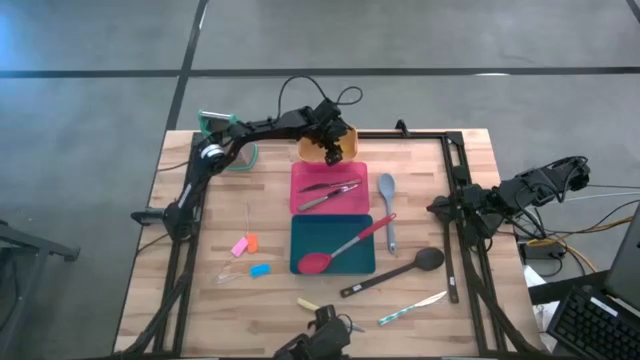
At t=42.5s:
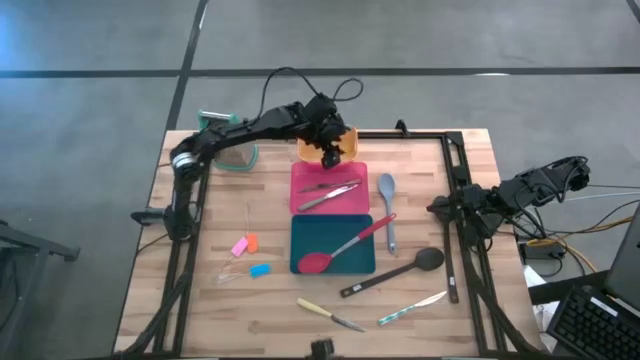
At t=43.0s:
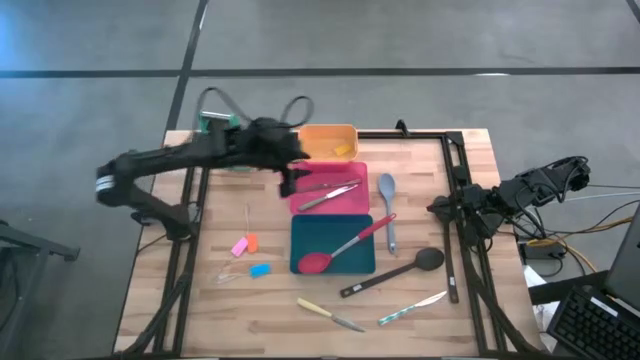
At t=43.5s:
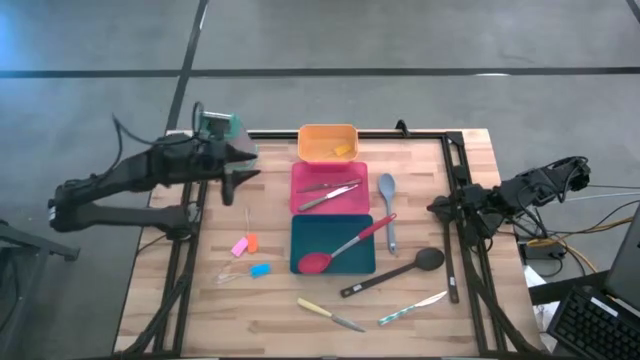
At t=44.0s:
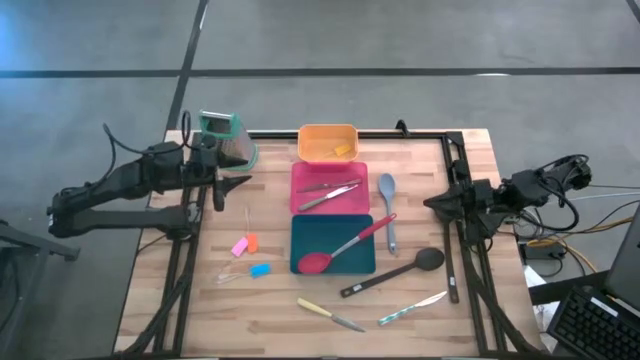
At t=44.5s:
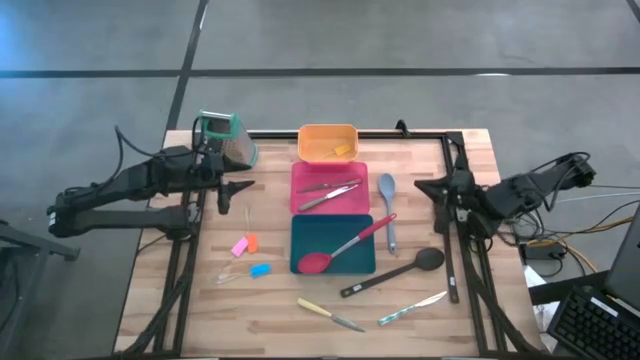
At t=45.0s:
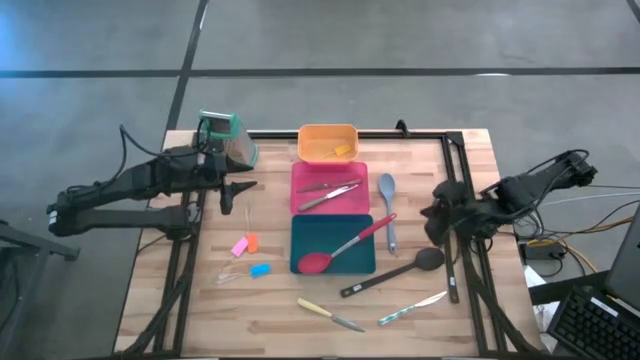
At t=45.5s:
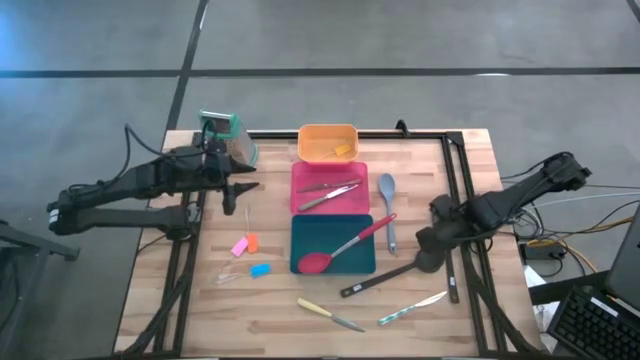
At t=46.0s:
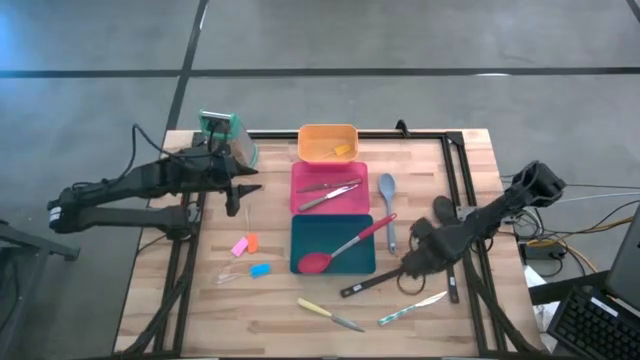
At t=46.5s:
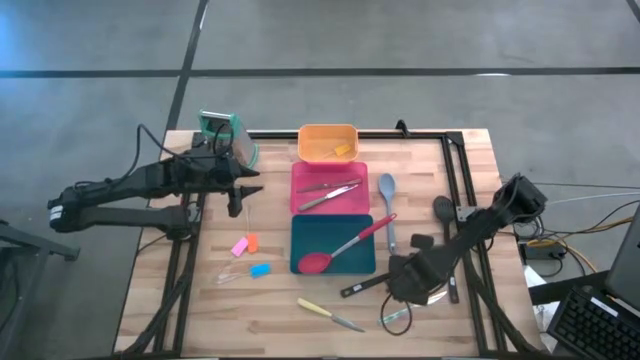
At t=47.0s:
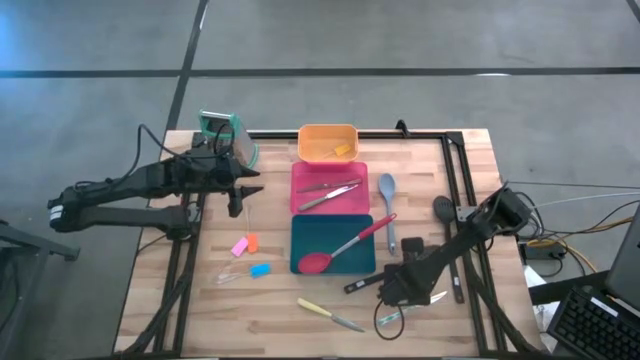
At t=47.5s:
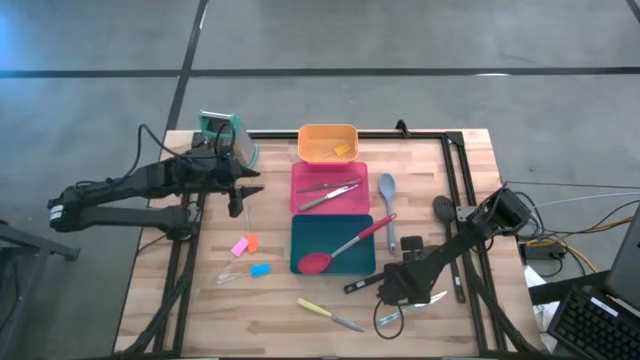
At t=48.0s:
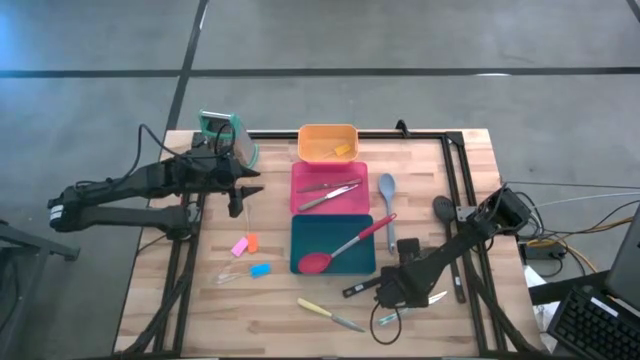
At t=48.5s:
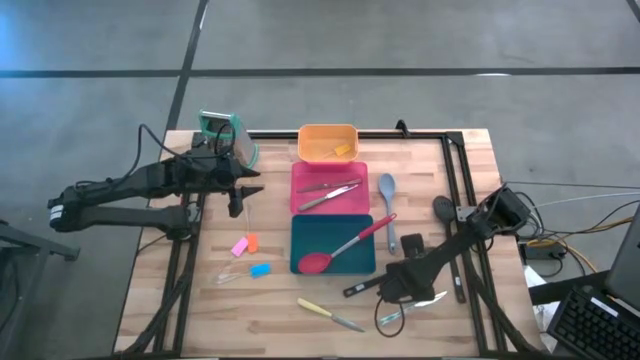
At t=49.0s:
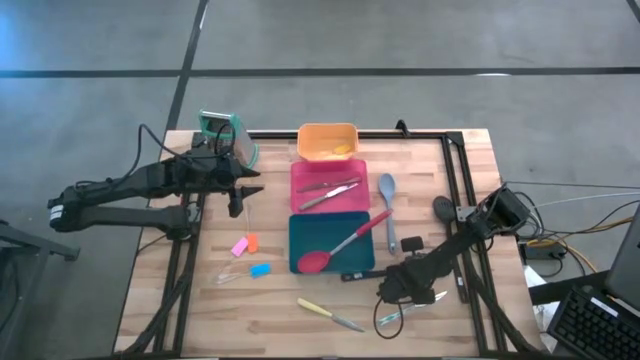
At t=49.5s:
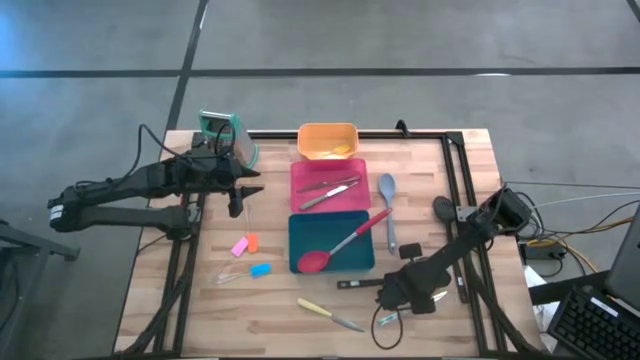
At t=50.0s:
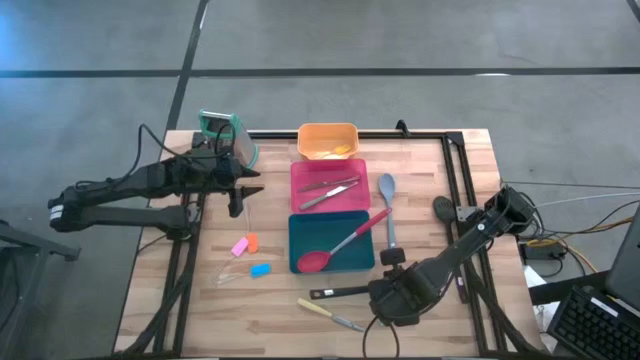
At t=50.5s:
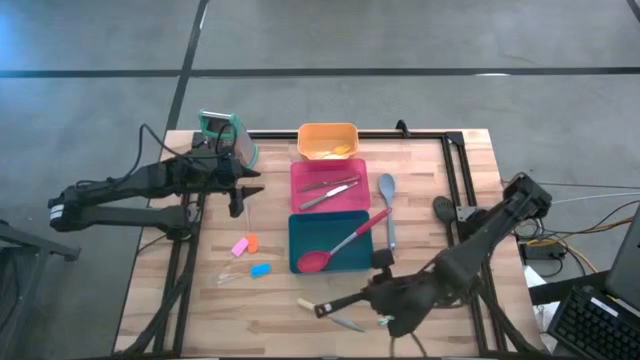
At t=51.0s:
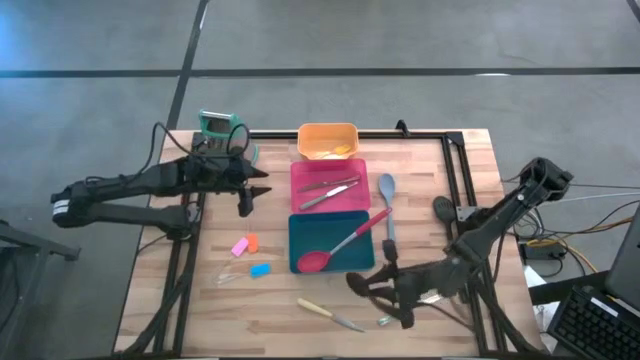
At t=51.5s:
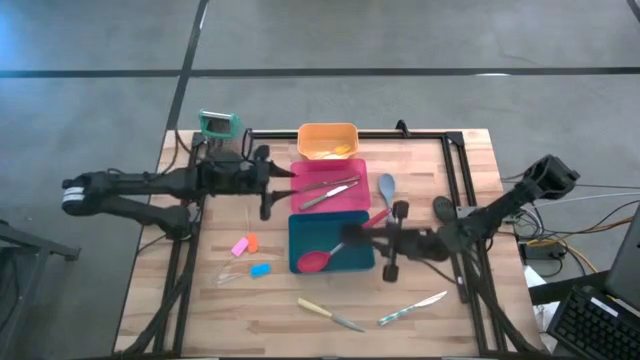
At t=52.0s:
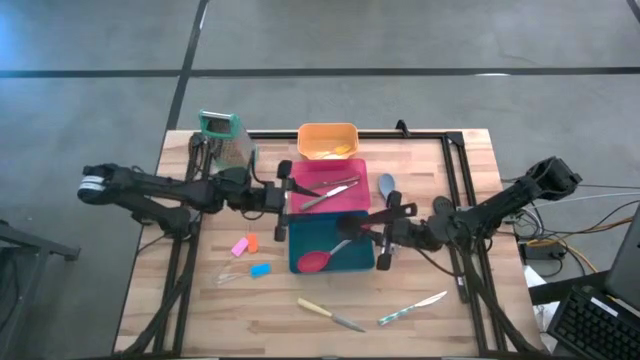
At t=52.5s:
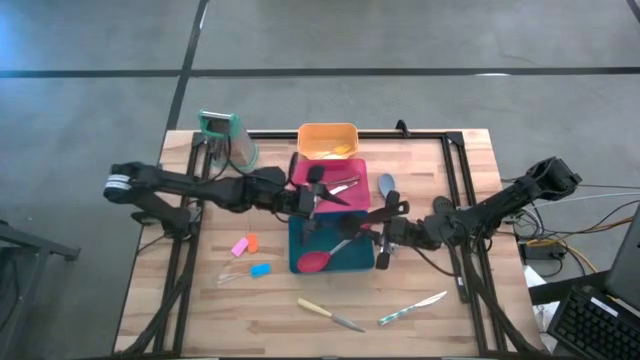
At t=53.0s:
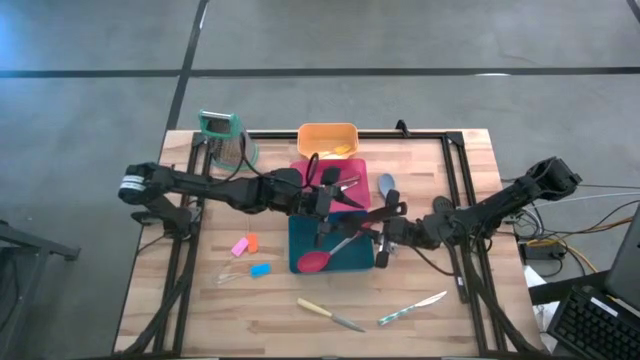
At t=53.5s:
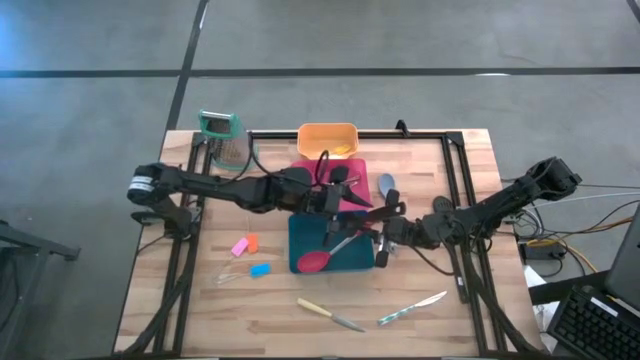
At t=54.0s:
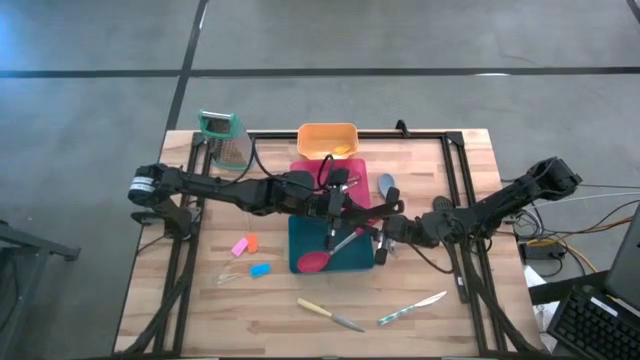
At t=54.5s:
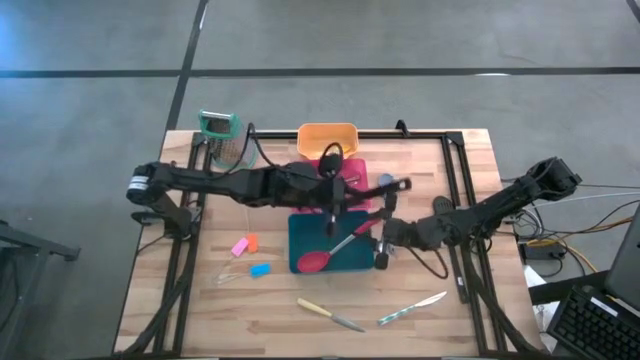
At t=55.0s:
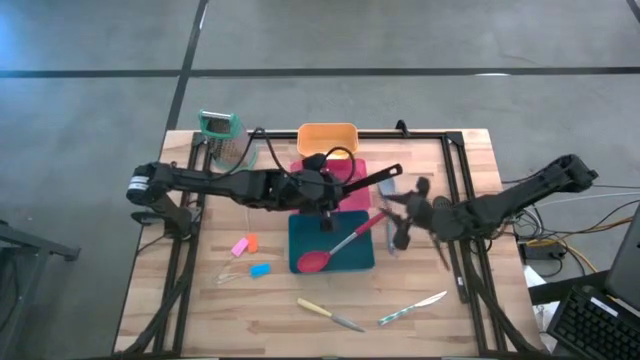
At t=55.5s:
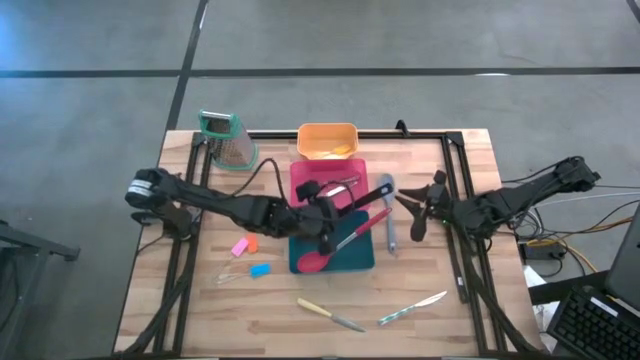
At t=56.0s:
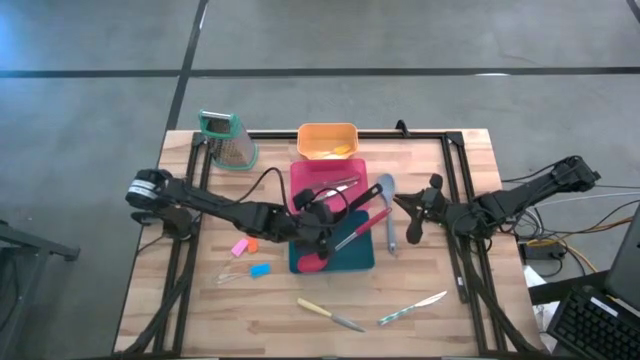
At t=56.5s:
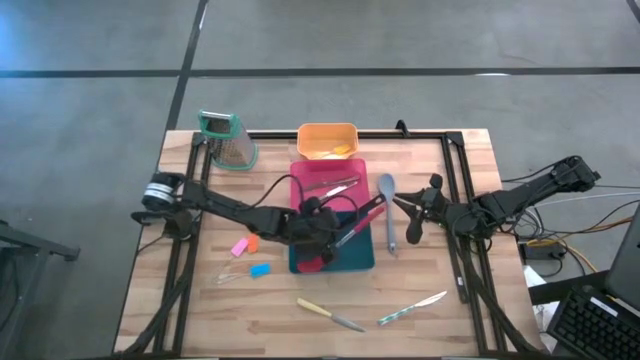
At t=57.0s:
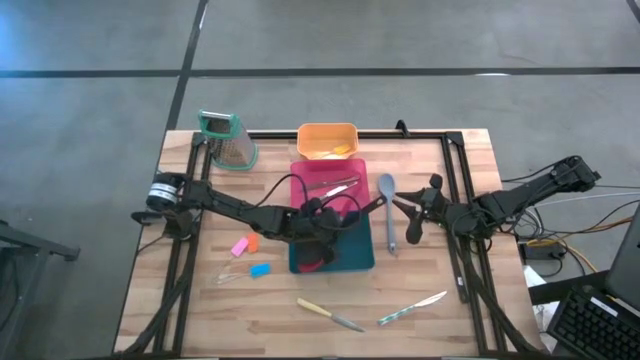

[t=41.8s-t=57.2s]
Task: Pick & Place Kitchen Items
Put the black spoon into the blue bin

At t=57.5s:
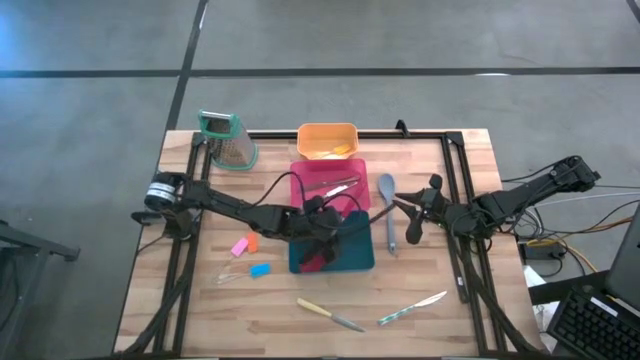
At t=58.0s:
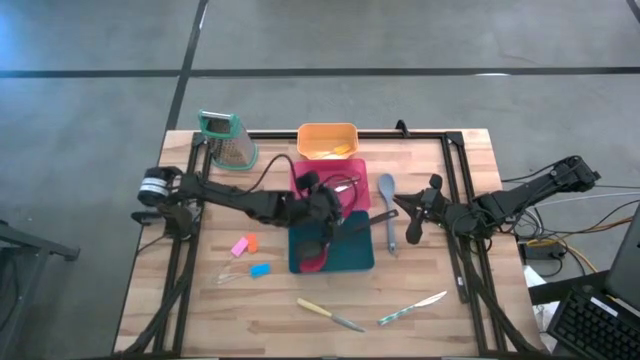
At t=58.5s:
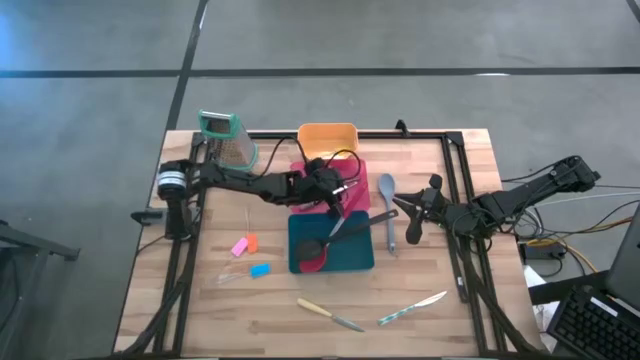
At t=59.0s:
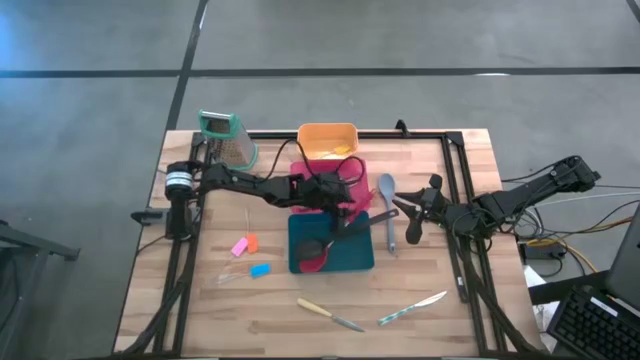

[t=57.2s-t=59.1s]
Adjust the red spoon

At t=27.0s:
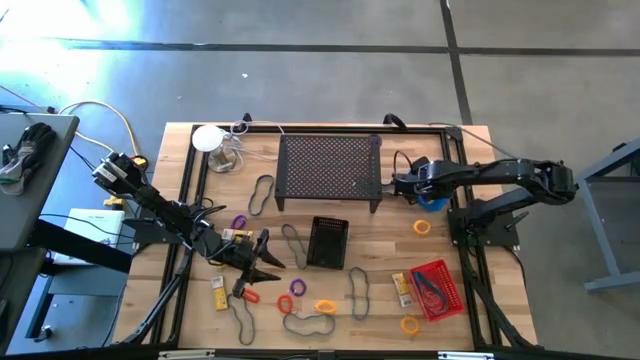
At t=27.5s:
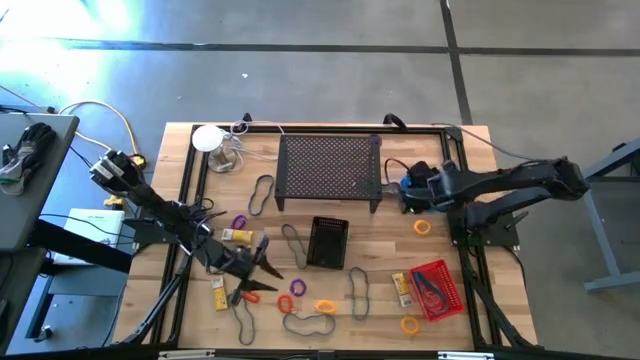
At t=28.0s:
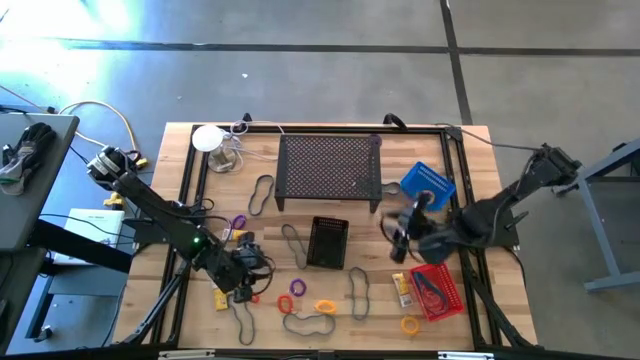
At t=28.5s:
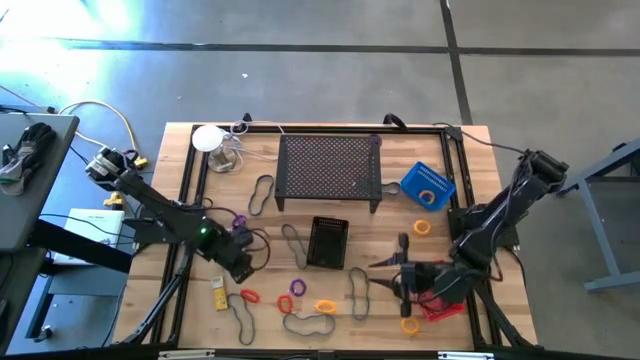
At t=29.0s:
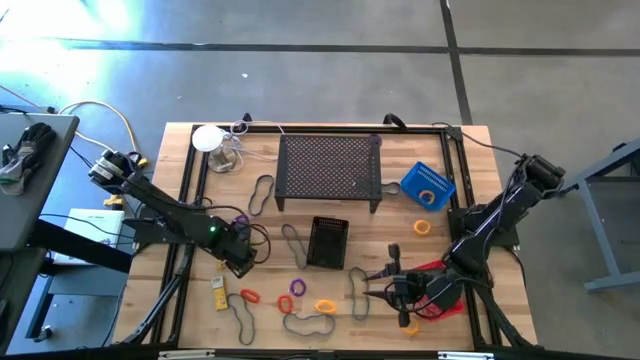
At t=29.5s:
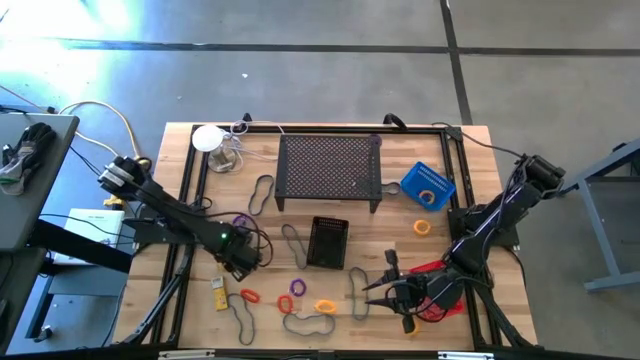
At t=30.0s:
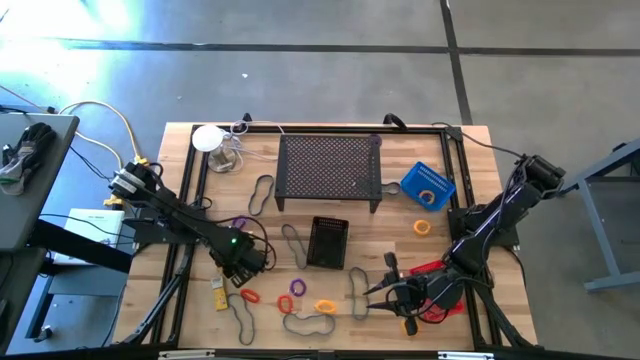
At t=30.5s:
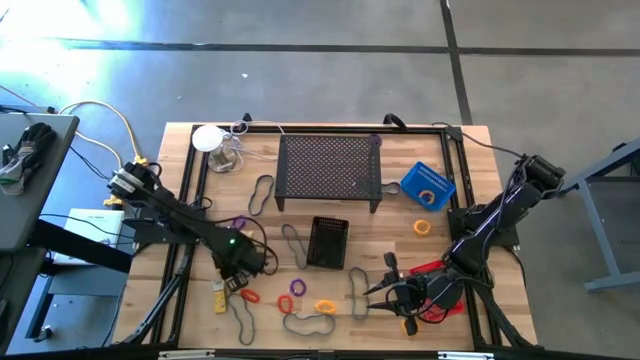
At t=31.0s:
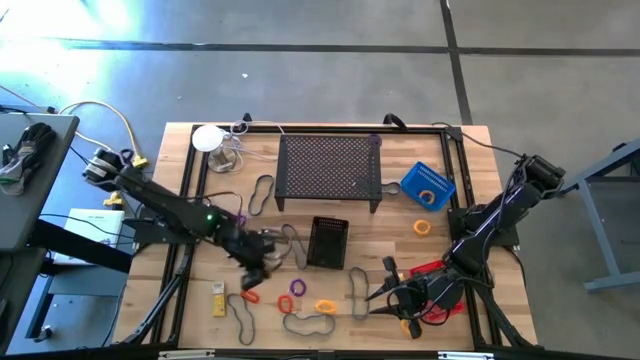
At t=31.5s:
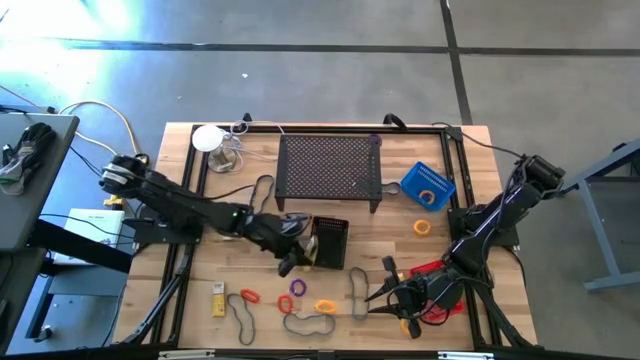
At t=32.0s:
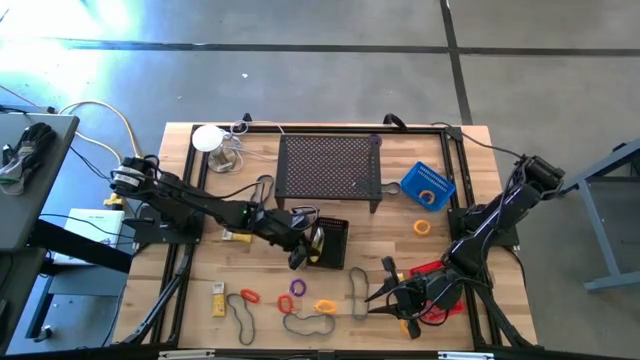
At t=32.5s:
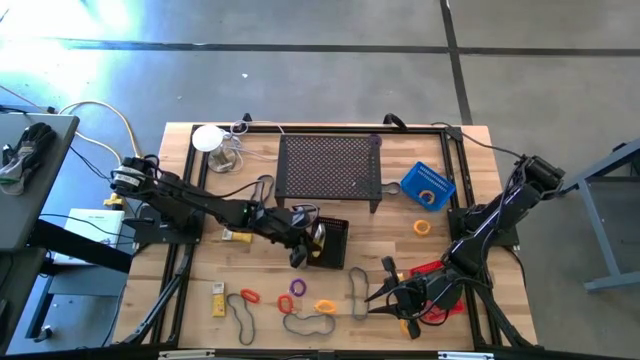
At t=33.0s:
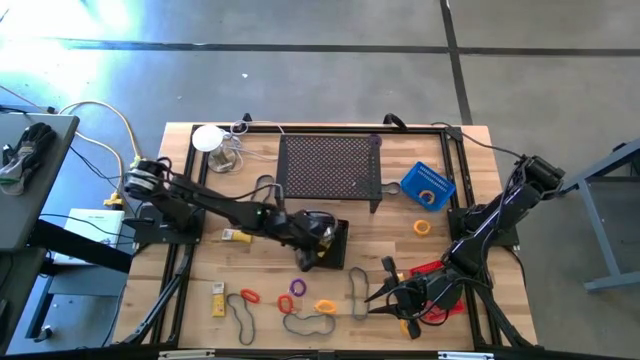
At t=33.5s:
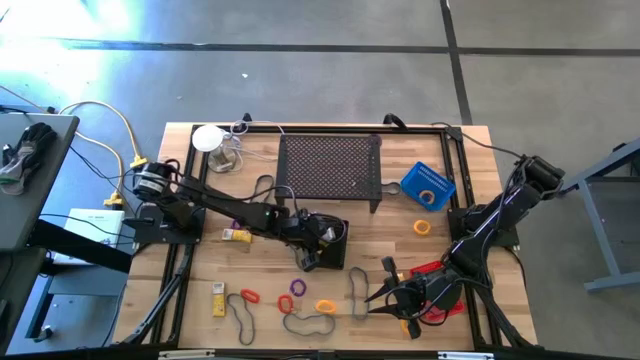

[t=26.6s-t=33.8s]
Task: Pick & Place Office Desk Supplies
Put the yellow crayon box into the black bin
